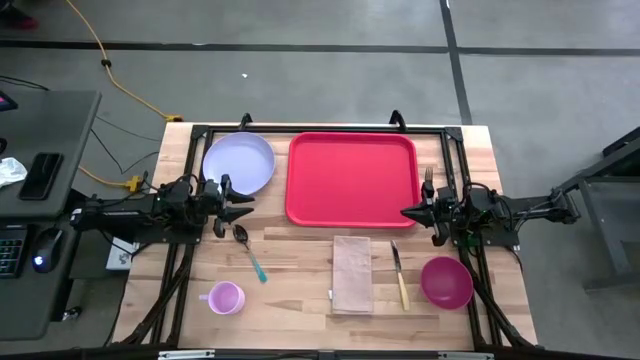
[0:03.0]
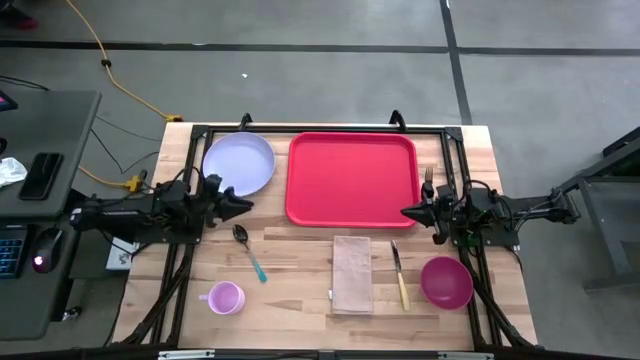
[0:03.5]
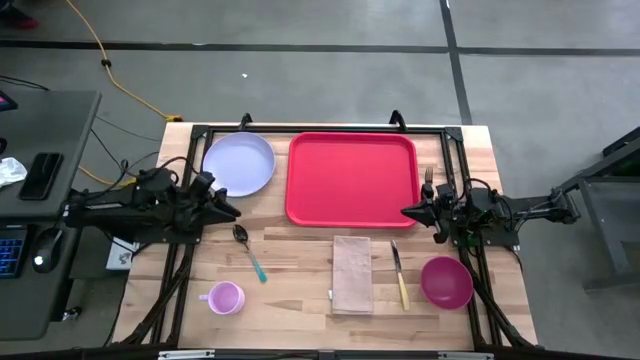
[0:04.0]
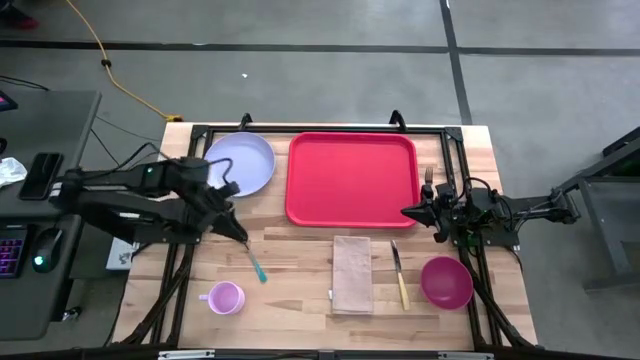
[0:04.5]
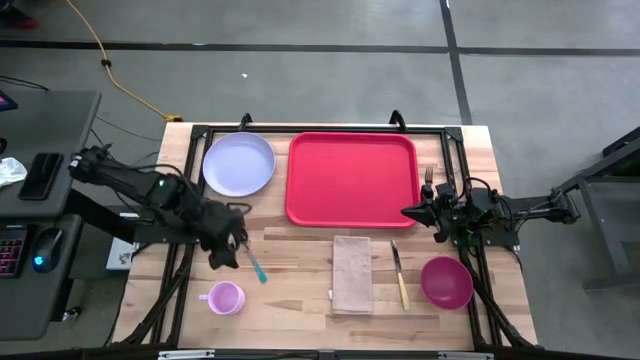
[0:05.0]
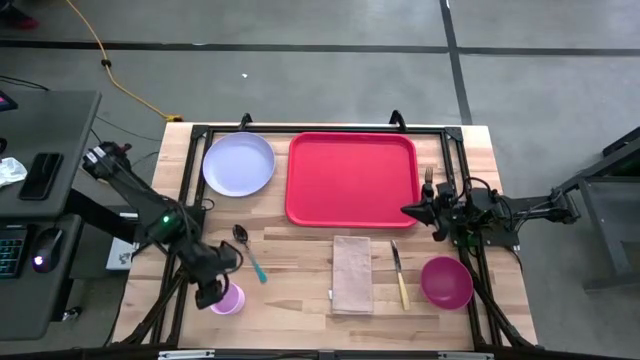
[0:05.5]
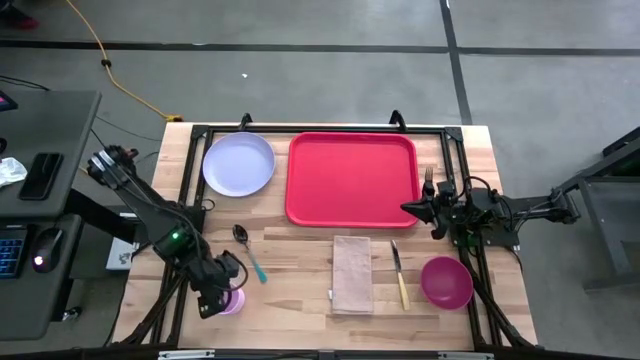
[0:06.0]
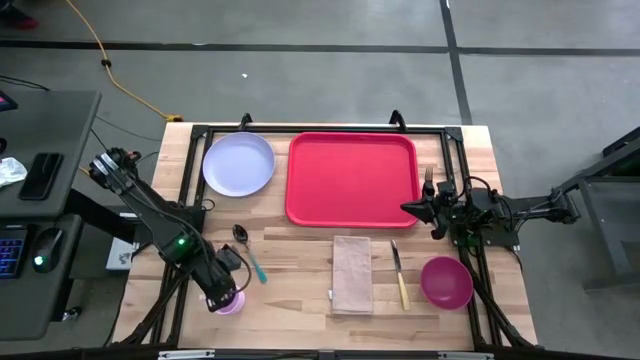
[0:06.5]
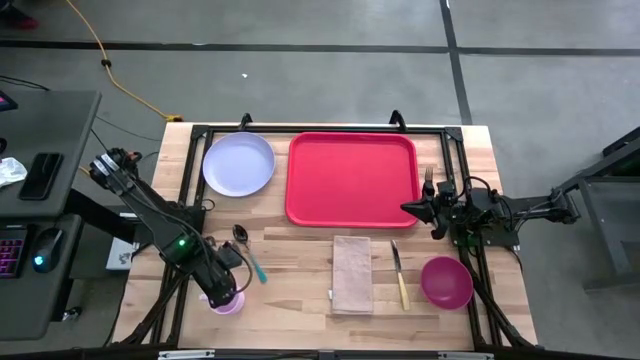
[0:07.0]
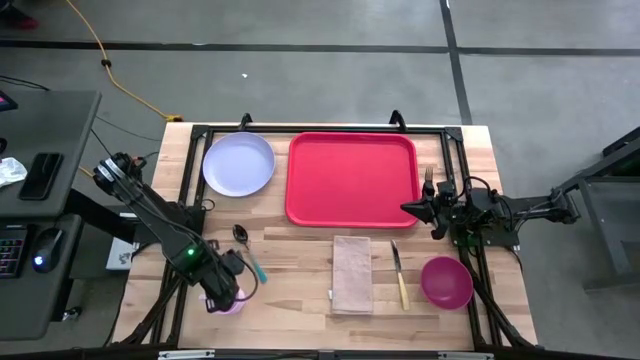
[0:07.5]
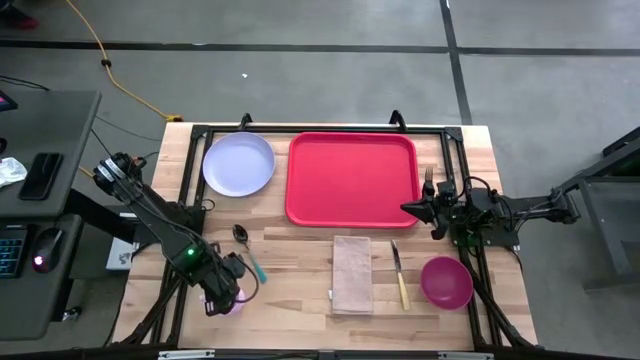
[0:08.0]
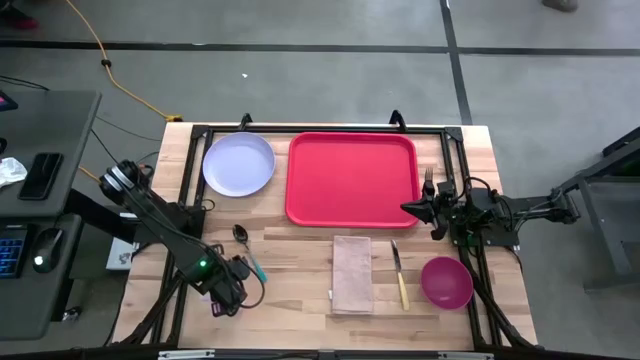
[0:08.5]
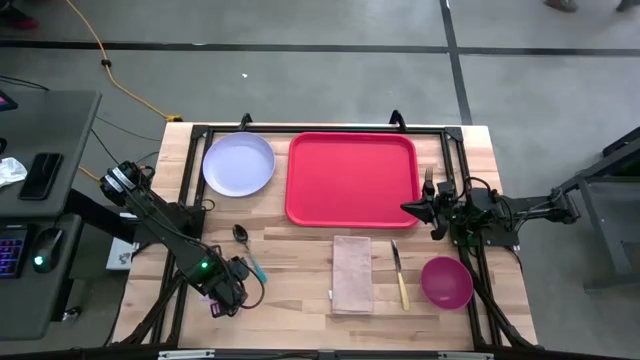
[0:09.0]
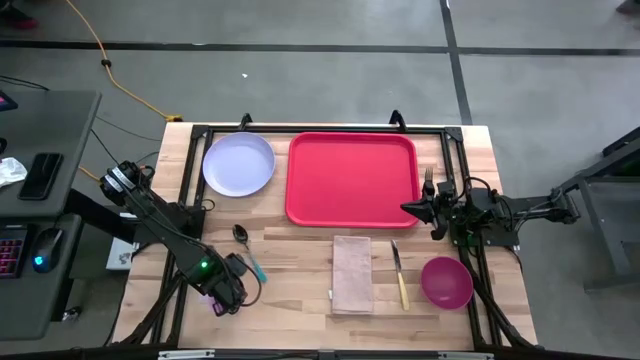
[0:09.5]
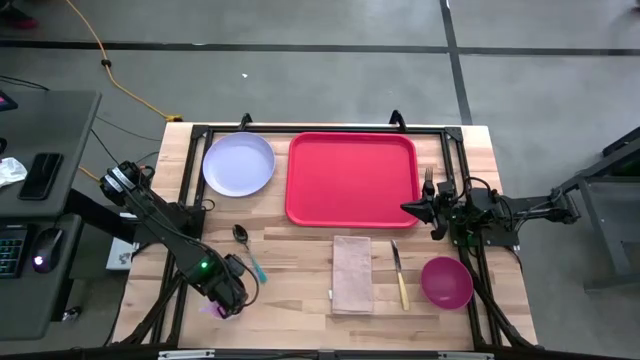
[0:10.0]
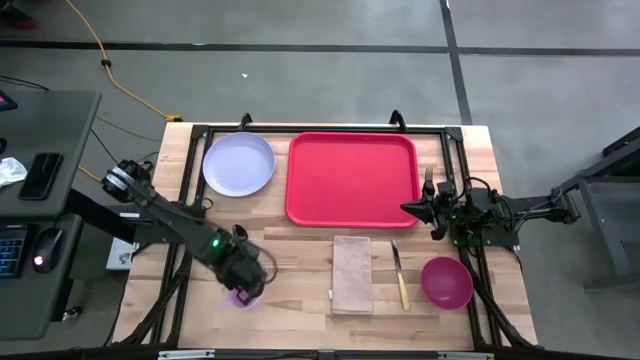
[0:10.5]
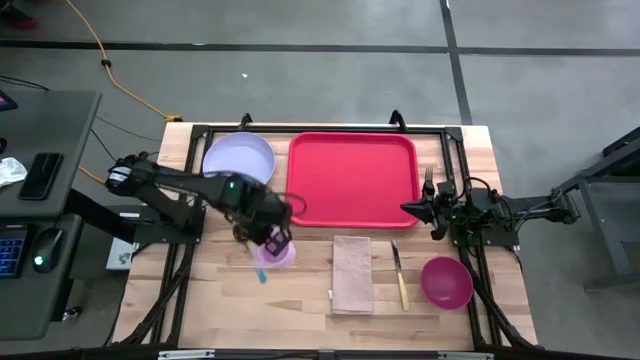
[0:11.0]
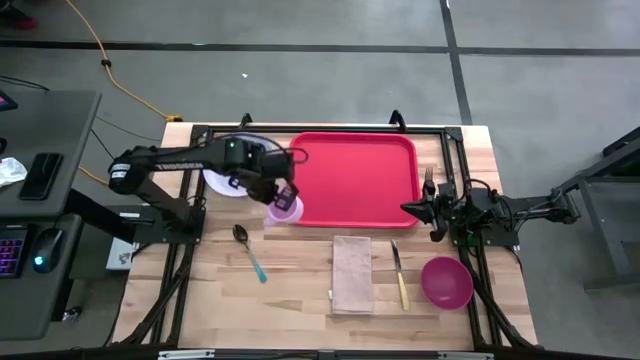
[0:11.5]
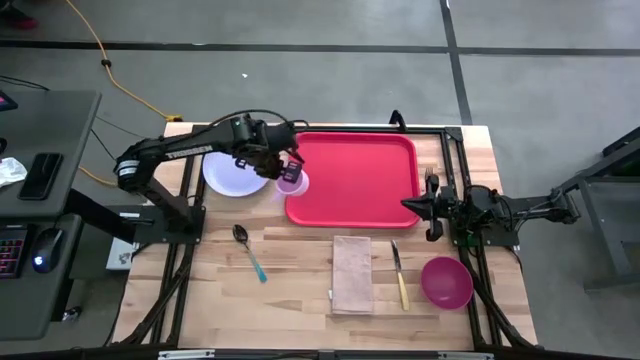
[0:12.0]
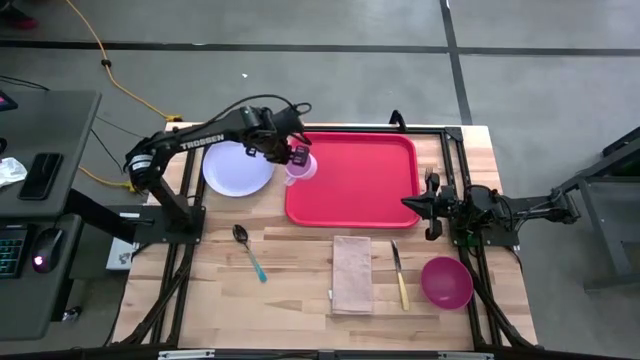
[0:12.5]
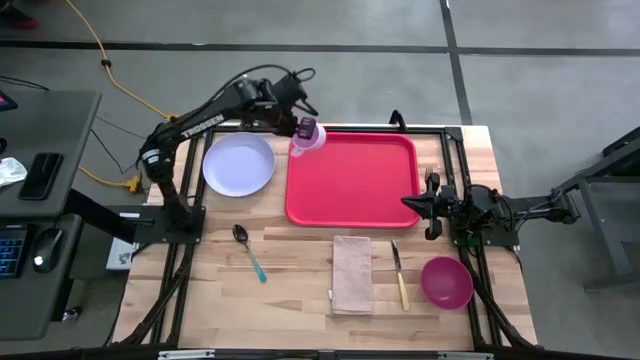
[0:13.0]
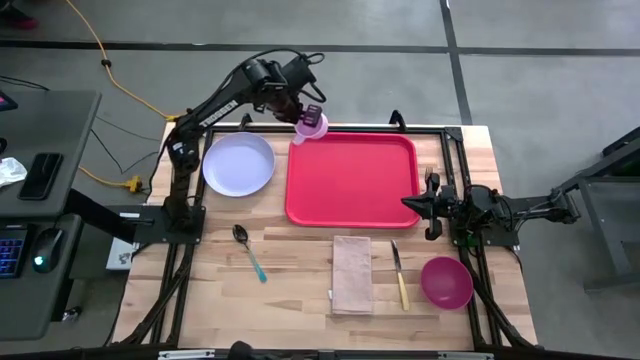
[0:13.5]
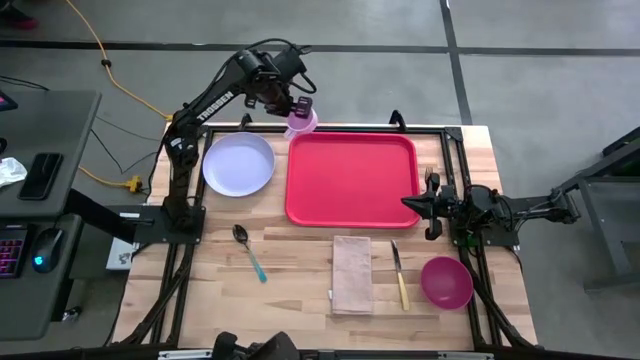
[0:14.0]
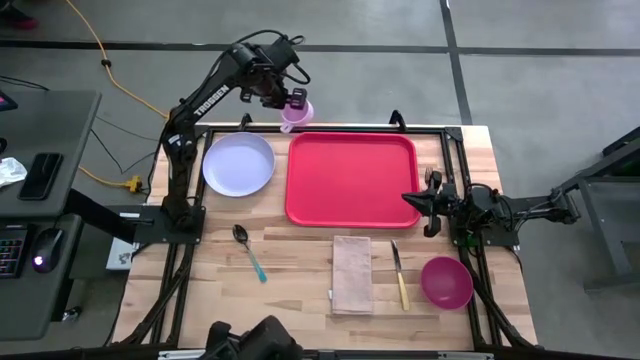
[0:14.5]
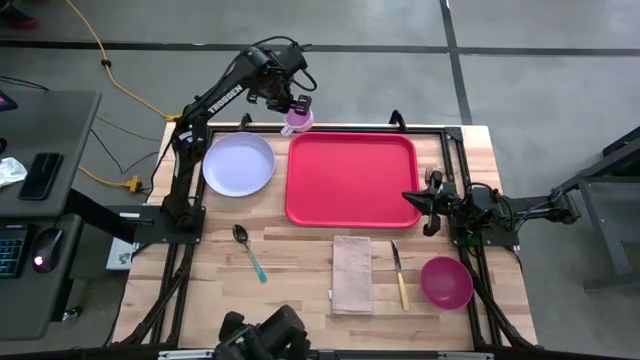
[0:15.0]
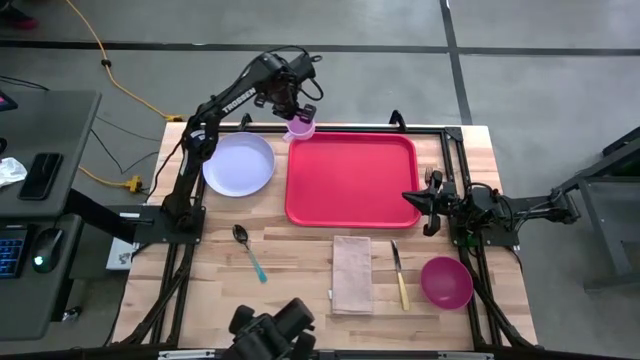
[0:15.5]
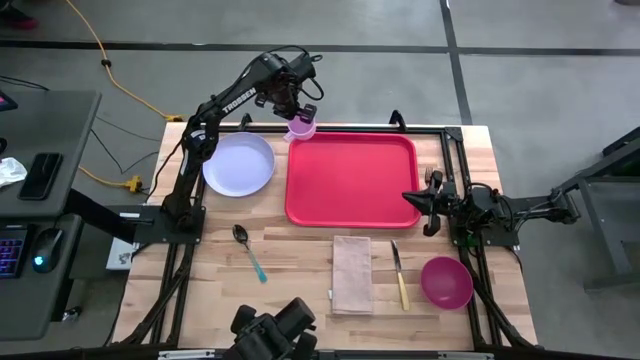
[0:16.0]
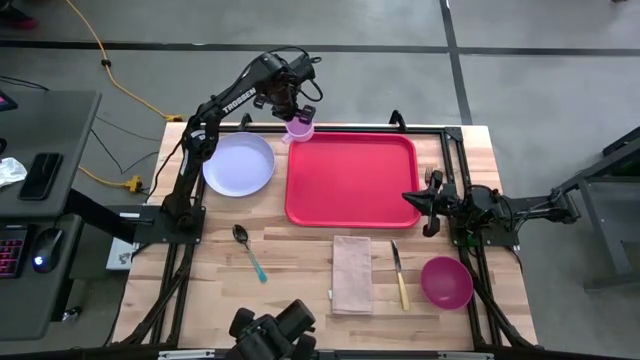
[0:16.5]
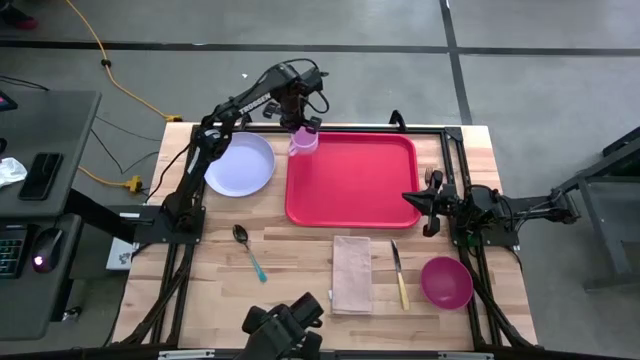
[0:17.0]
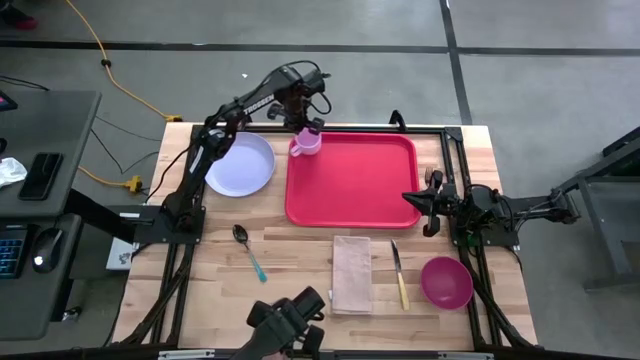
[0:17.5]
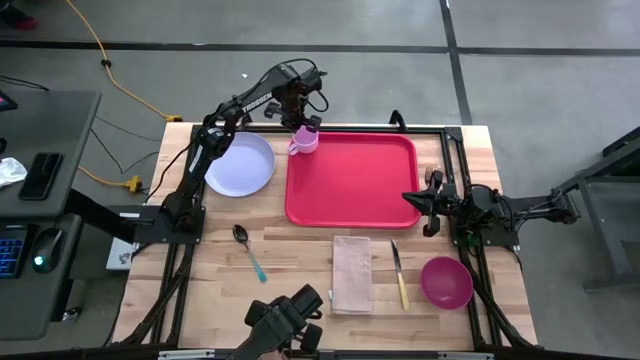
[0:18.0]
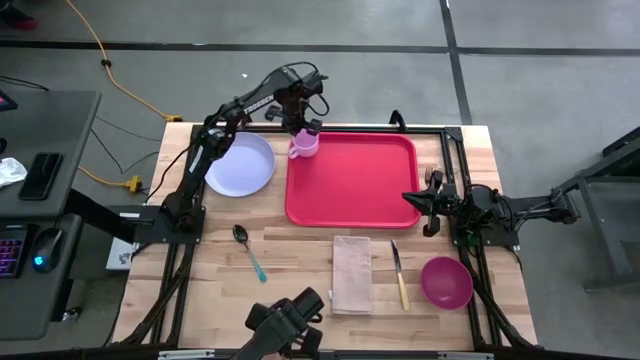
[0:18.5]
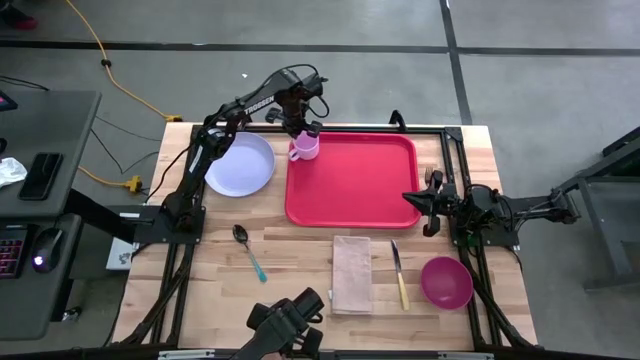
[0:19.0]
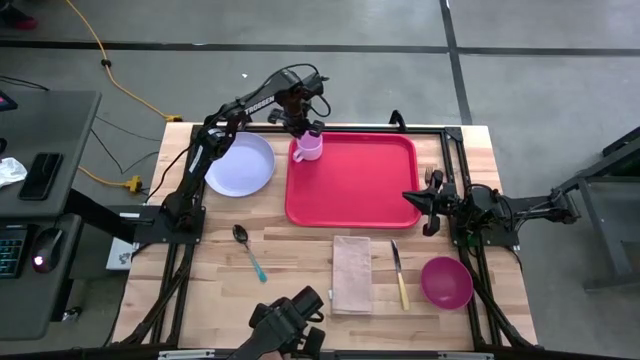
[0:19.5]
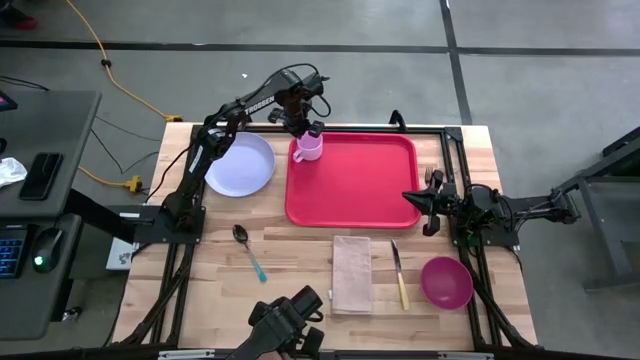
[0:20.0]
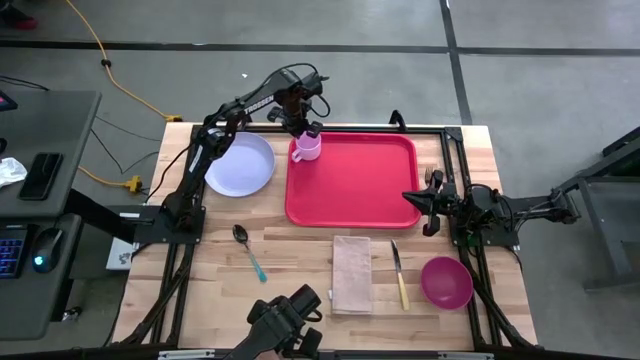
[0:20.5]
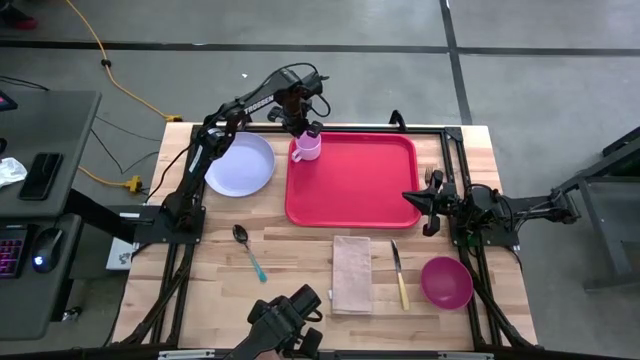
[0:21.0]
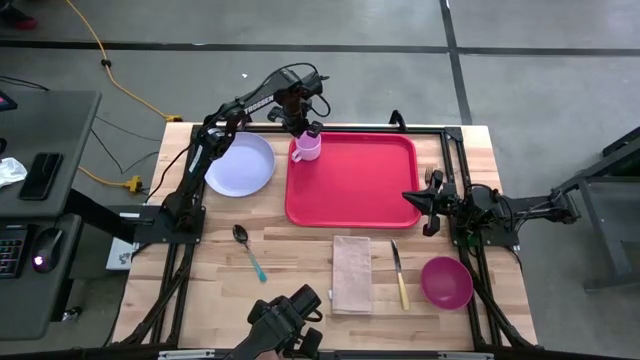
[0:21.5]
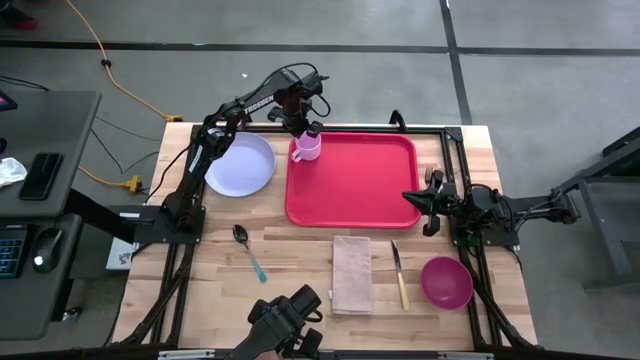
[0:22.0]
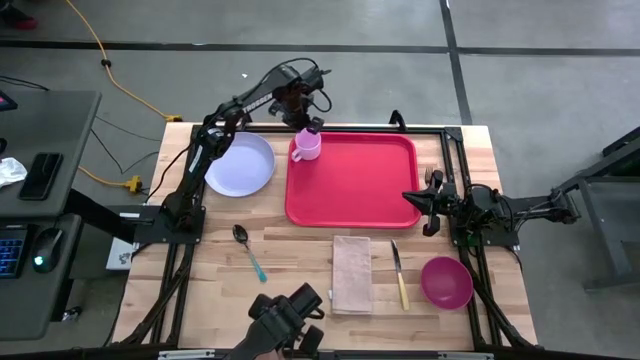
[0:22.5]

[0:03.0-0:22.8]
Task: Set up tray
Put the pink cup on the top left of the red serving tray
